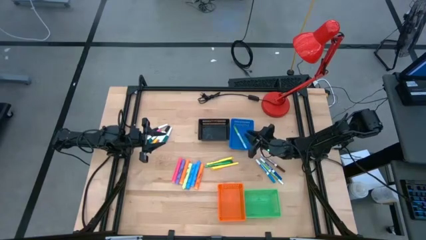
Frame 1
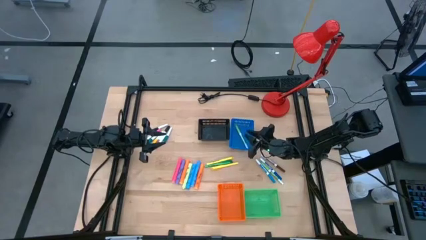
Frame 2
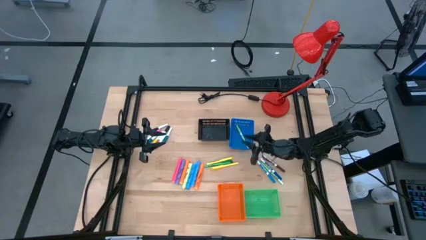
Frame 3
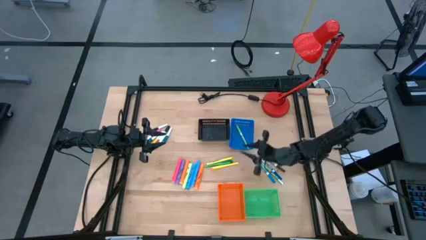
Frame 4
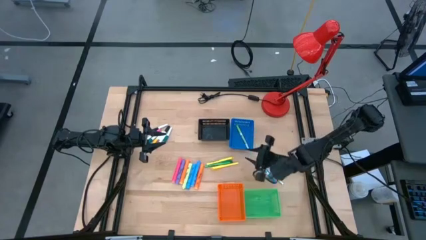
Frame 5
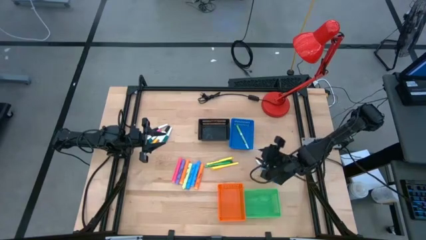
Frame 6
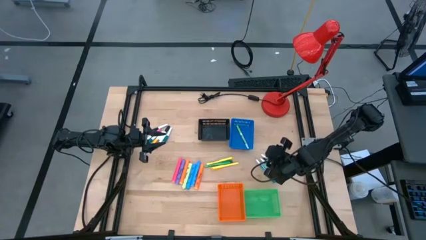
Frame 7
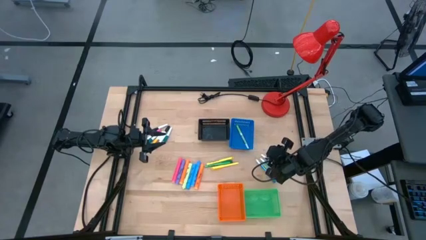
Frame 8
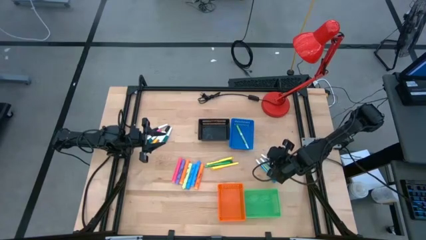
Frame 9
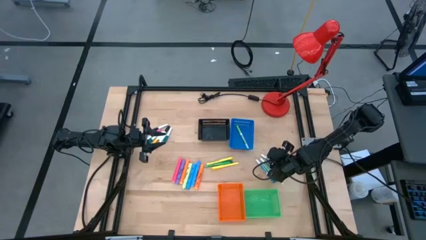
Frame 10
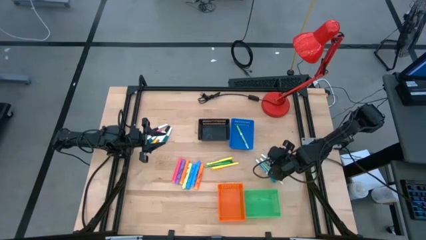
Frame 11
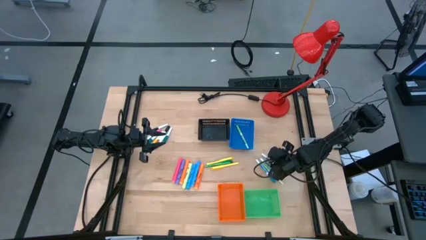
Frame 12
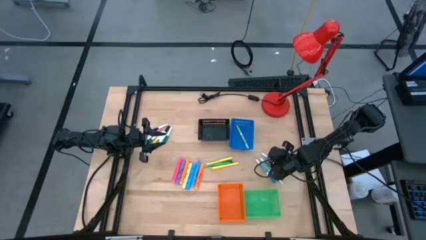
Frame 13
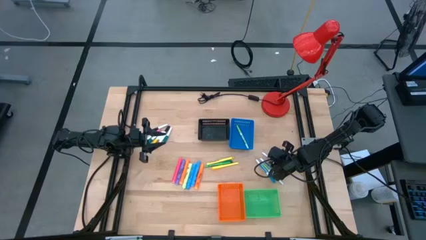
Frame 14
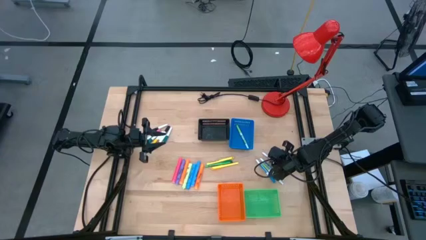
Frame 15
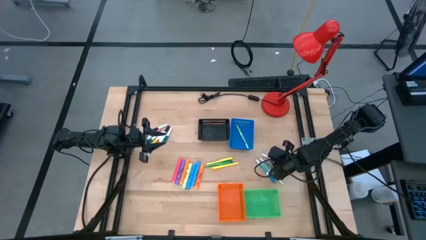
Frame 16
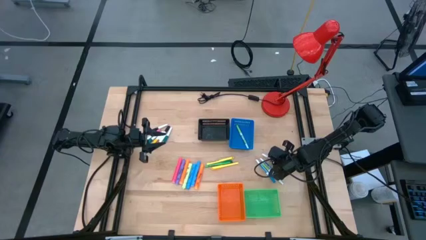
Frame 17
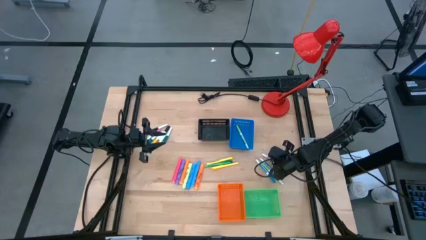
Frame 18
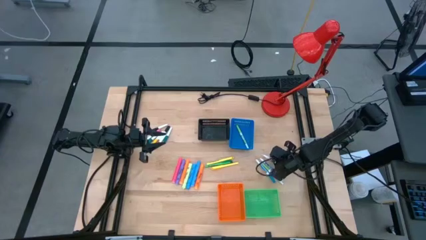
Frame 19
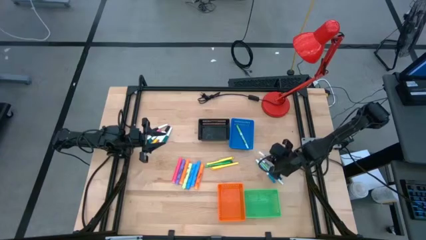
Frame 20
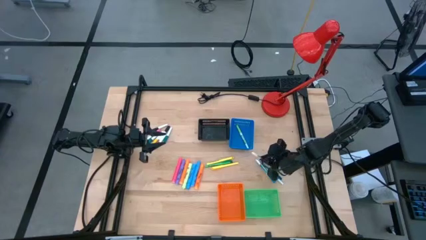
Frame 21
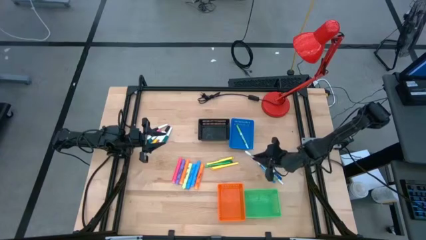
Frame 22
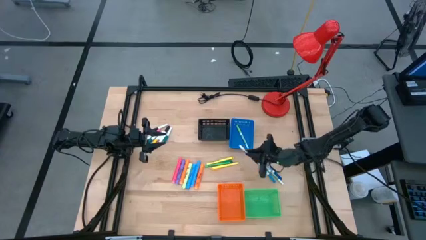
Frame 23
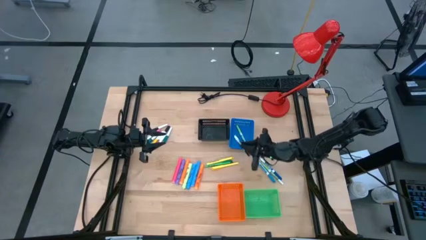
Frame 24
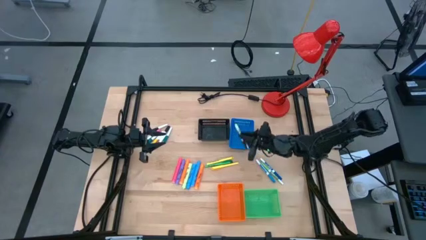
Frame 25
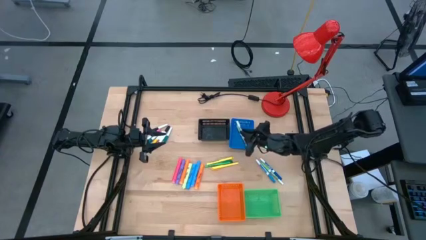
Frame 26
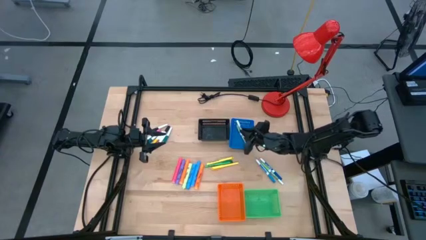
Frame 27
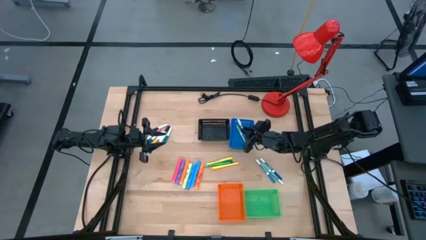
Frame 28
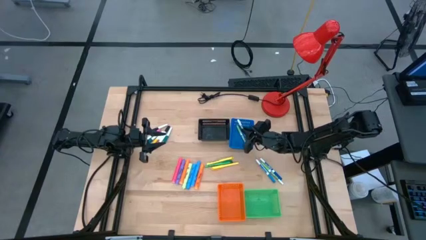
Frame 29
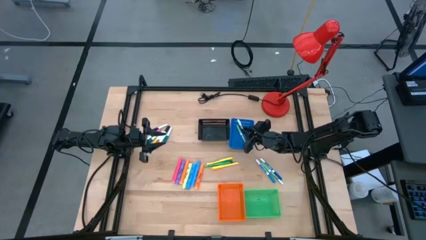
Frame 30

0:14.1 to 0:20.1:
Task: Pick & Place Markers
Put the brown marker pen into the blue bin

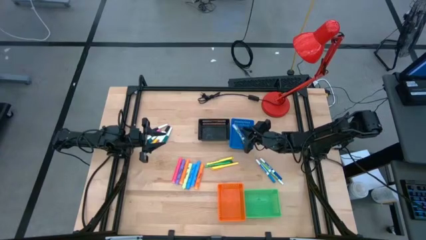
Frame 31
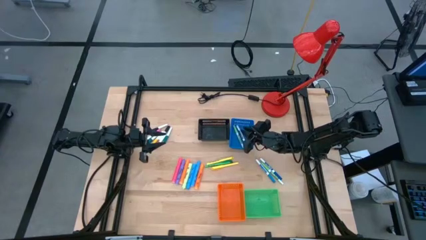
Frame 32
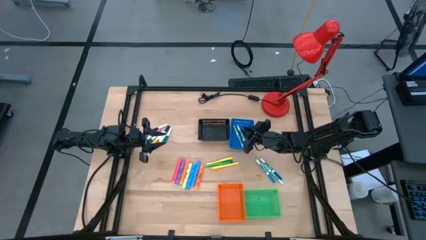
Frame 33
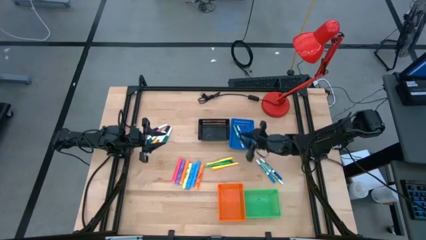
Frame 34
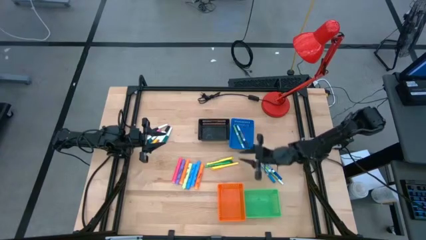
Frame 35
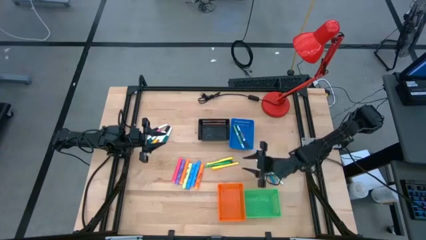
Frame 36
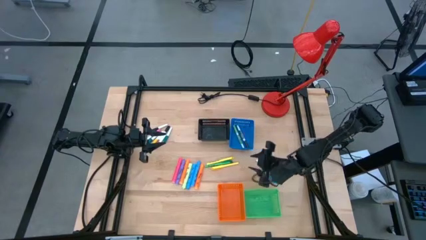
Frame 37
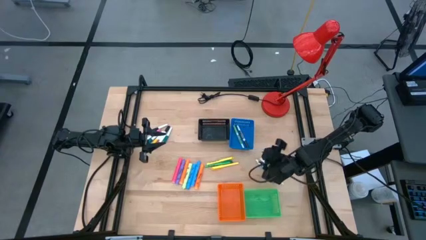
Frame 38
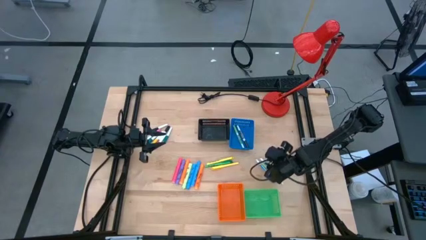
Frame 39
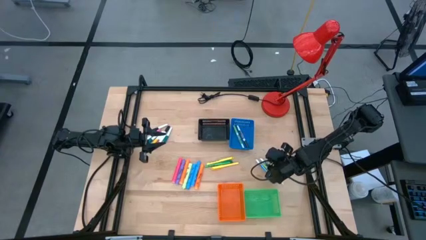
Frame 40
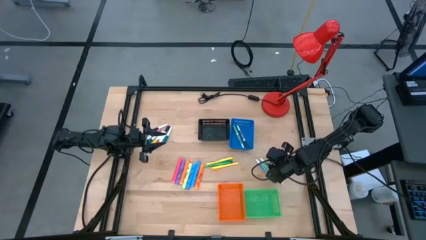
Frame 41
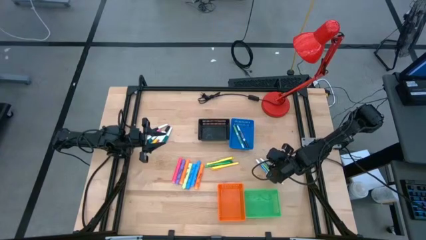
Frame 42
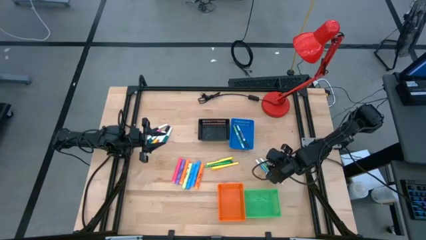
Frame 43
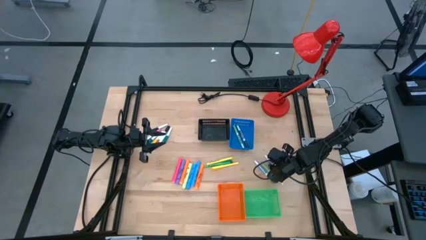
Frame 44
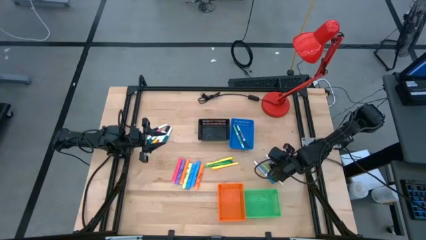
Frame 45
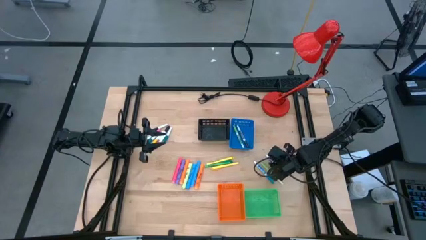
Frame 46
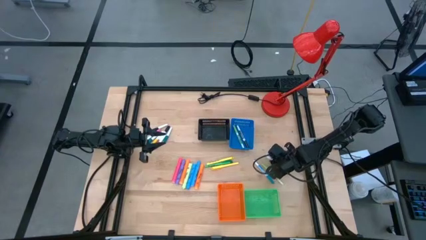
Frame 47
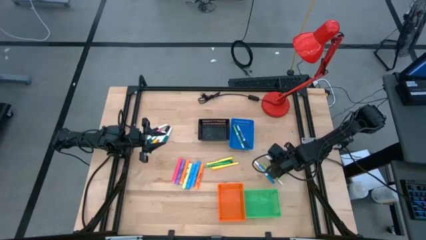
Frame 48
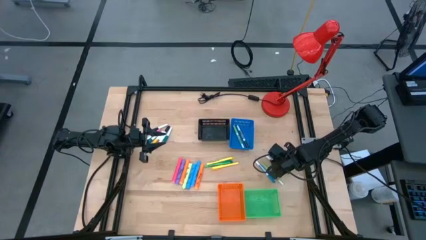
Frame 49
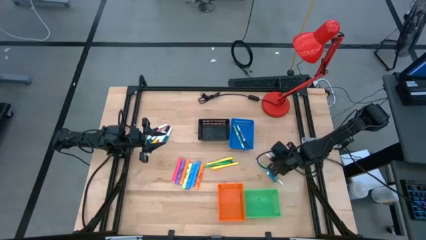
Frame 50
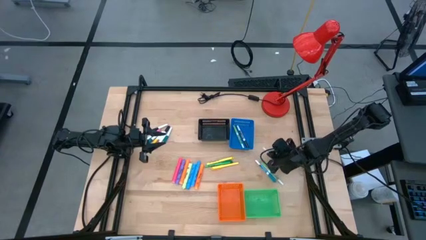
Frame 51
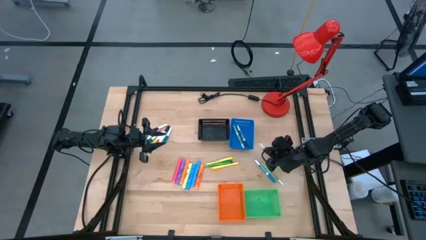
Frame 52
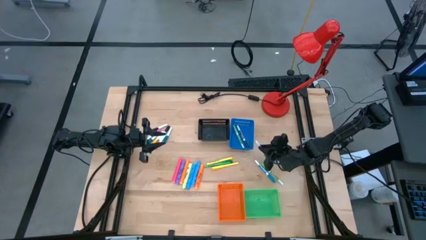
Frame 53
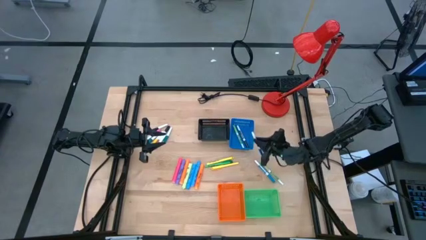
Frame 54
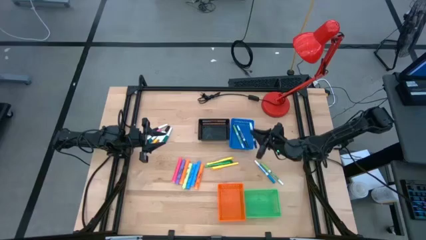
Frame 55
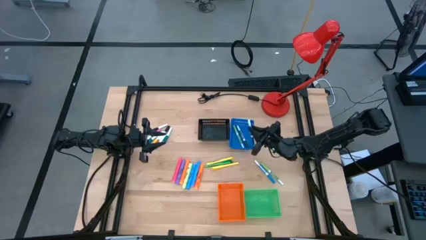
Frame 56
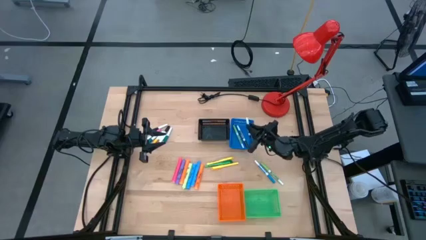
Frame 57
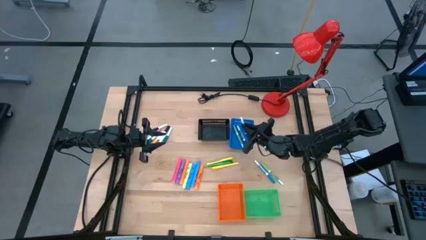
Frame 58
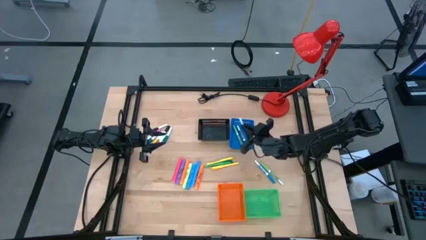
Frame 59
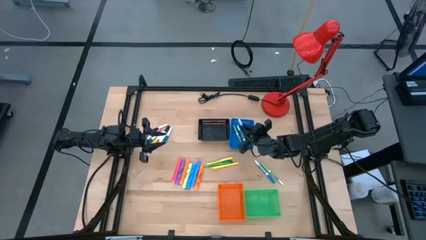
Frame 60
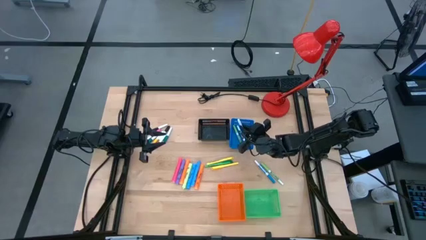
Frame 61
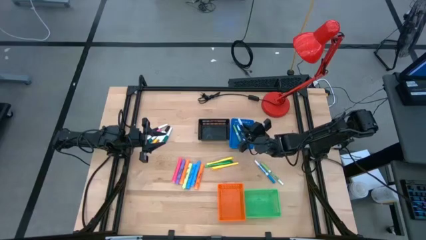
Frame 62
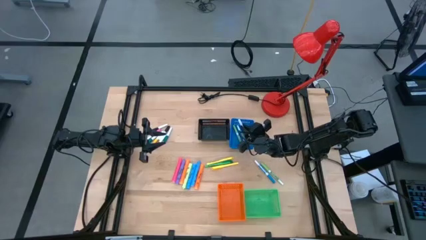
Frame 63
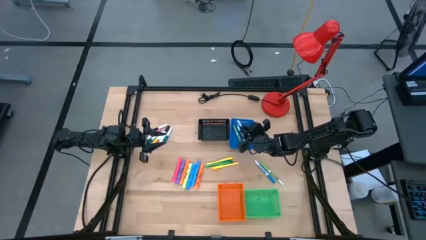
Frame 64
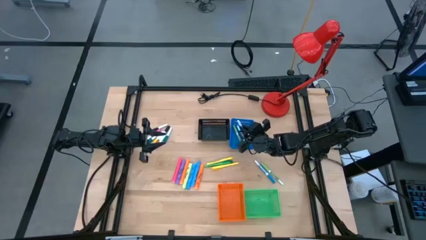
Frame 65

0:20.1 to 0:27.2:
Put the blue marker pen into the blue bin

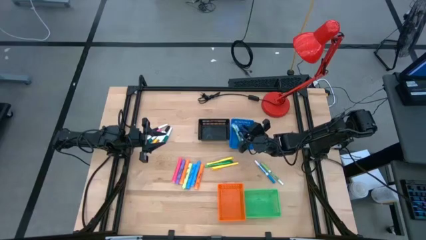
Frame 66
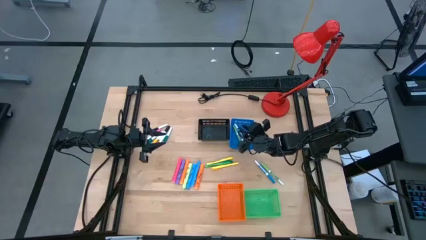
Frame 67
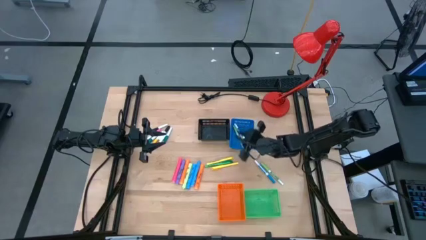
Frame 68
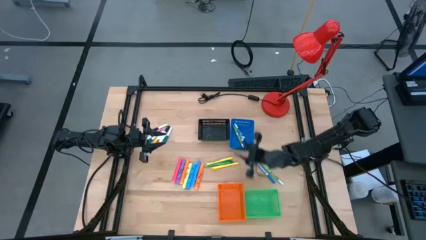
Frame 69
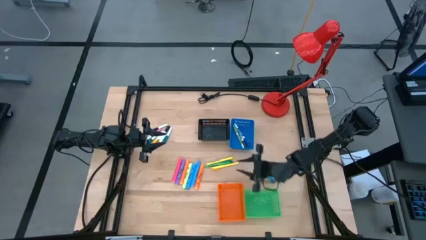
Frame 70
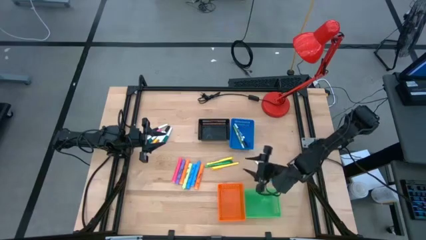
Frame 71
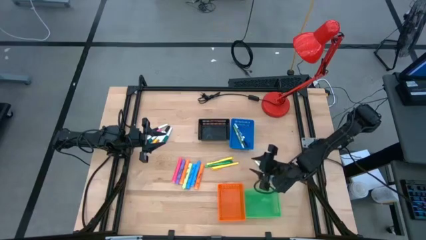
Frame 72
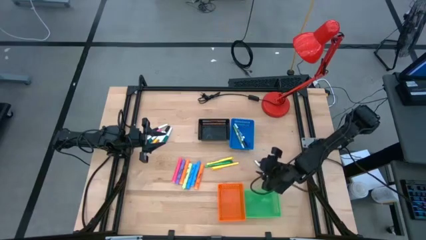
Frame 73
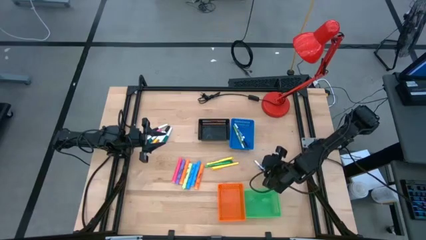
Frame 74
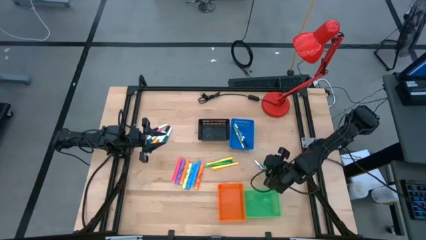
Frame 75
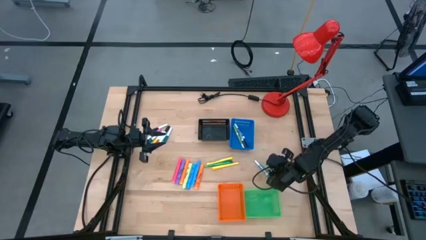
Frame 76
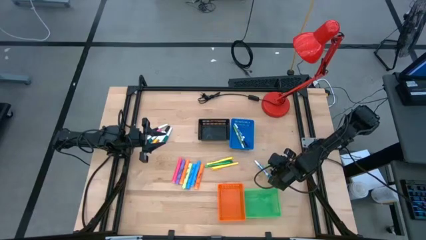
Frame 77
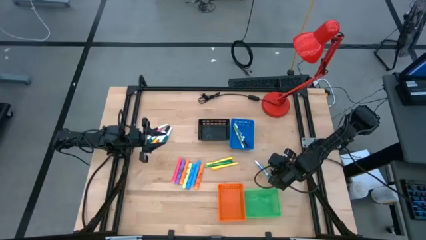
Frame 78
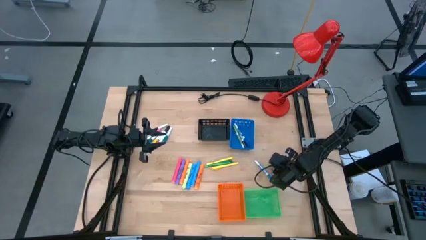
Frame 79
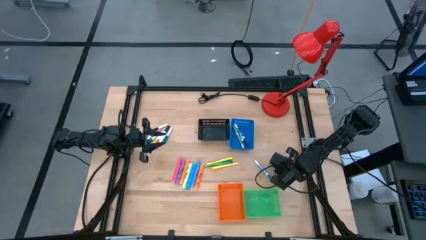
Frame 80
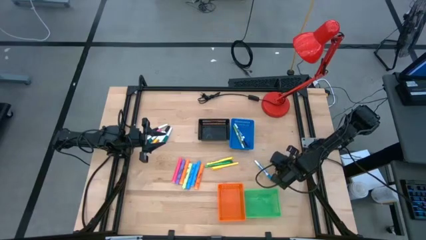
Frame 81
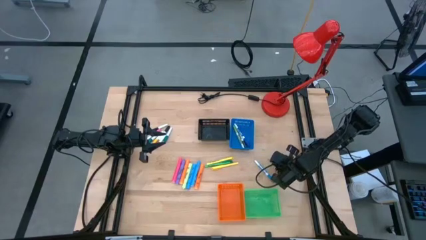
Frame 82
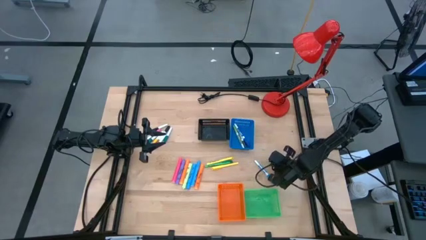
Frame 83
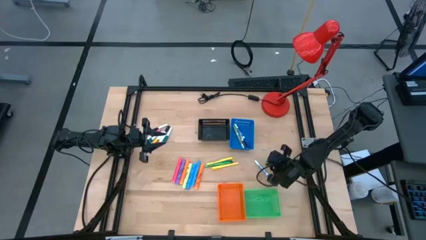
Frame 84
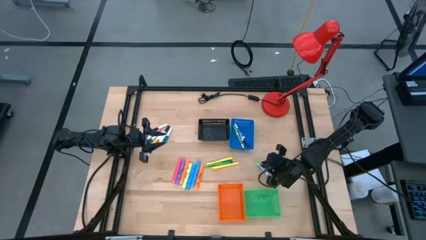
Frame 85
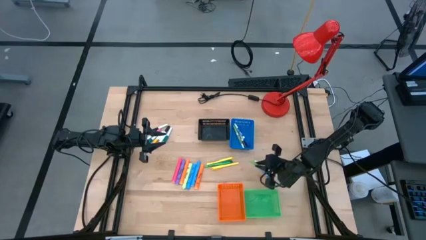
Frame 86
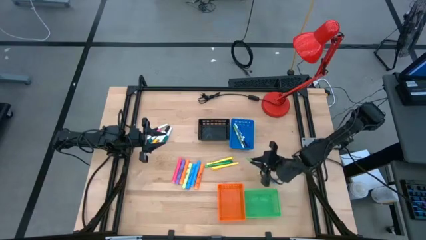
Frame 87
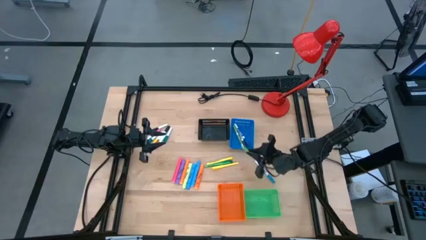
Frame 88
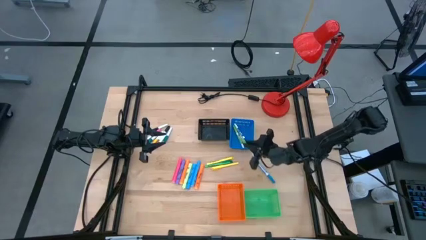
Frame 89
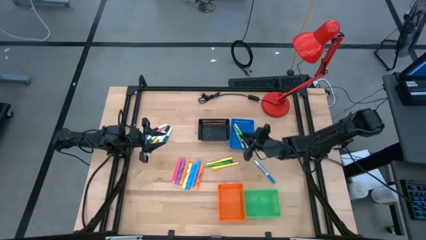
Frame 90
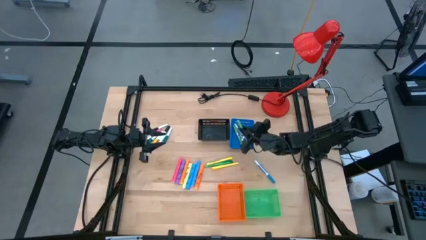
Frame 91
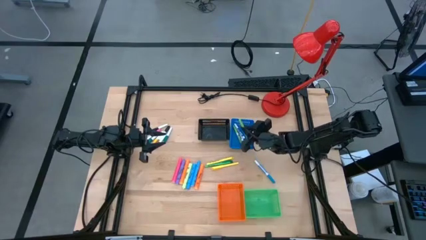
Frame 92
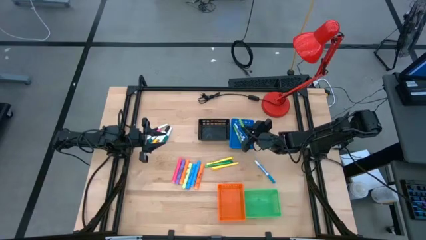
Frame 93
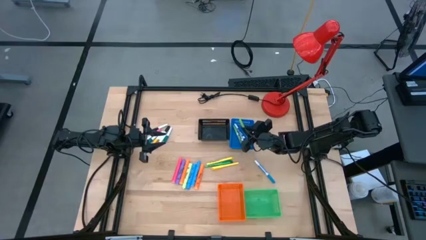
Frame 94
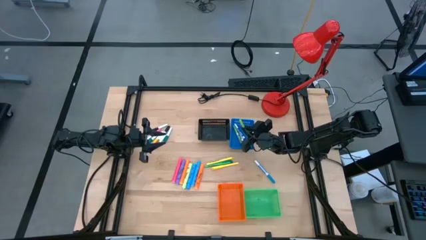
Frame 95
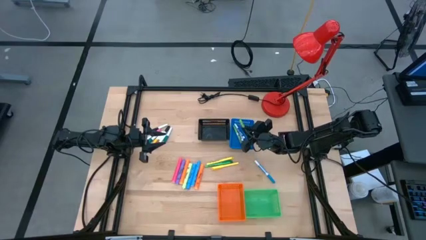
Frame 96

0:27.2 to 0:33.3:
Put the green marker pen into the blue bin
